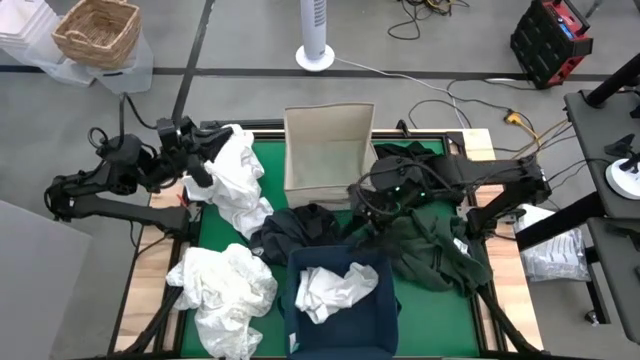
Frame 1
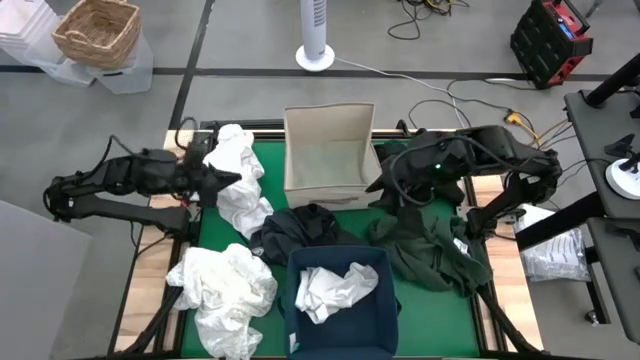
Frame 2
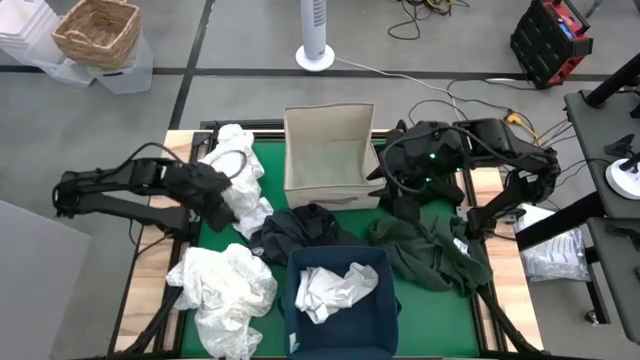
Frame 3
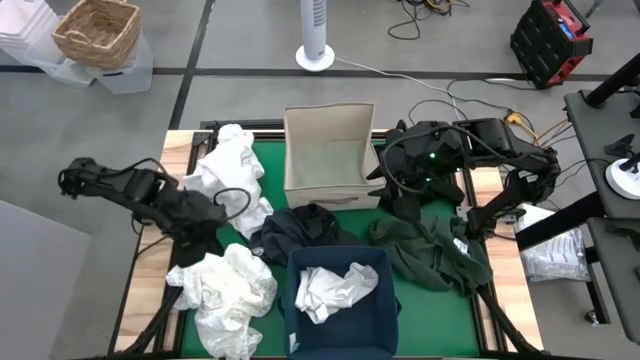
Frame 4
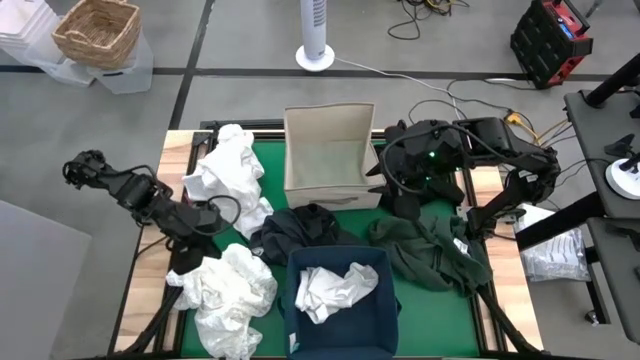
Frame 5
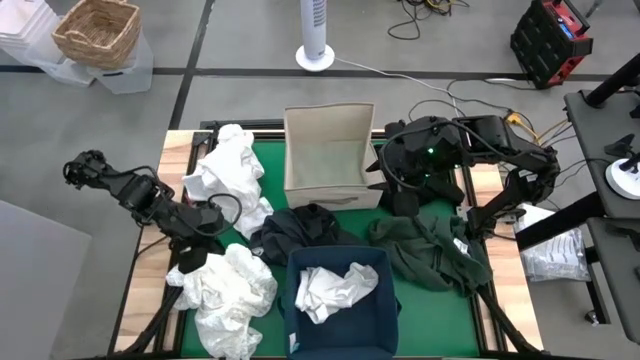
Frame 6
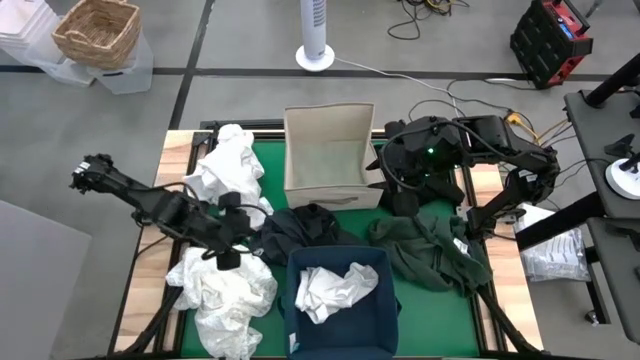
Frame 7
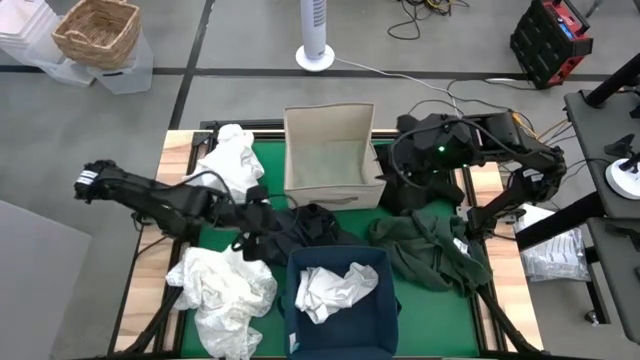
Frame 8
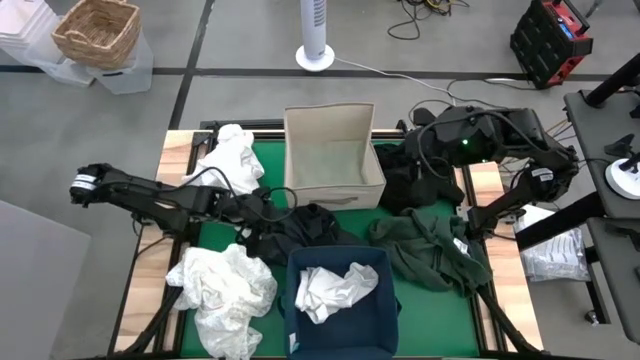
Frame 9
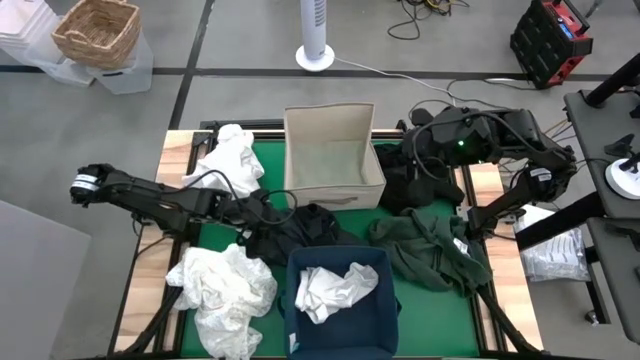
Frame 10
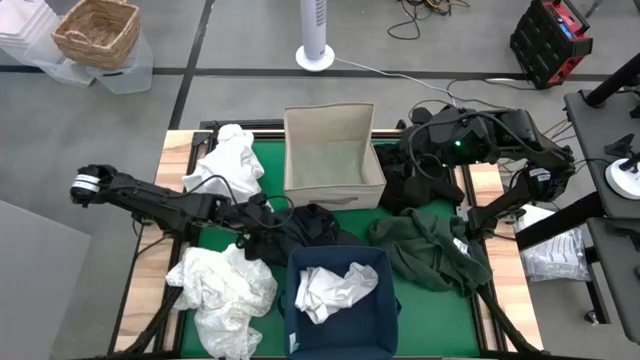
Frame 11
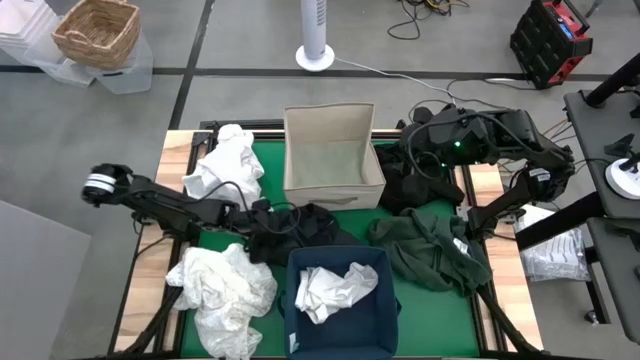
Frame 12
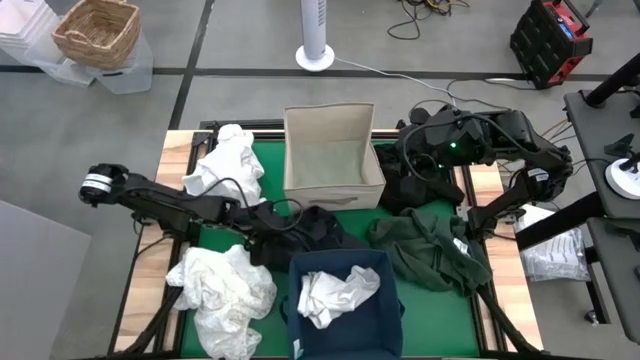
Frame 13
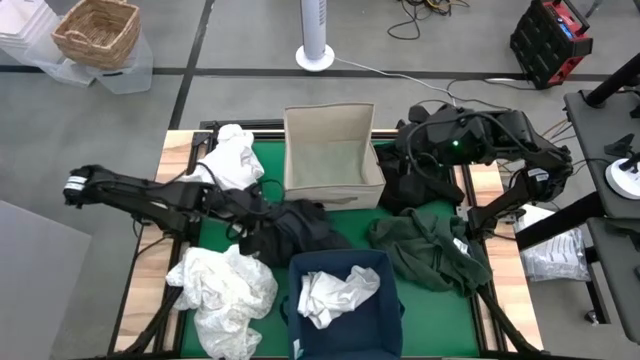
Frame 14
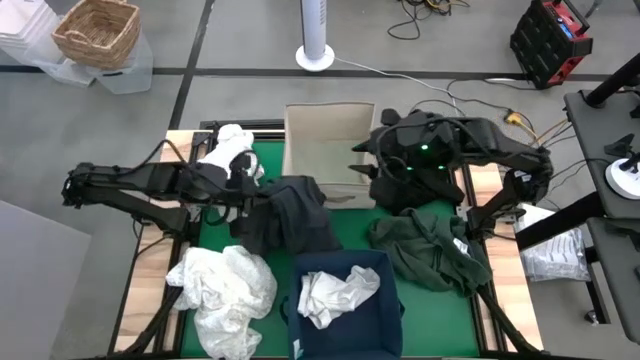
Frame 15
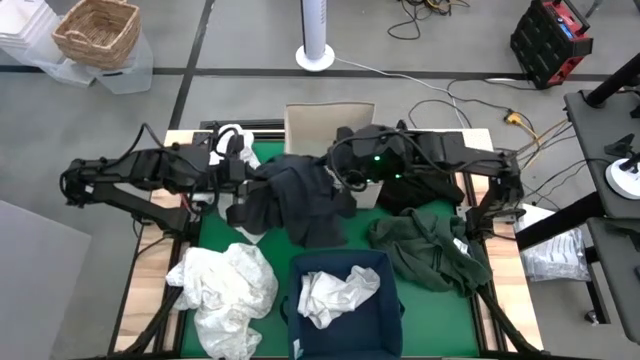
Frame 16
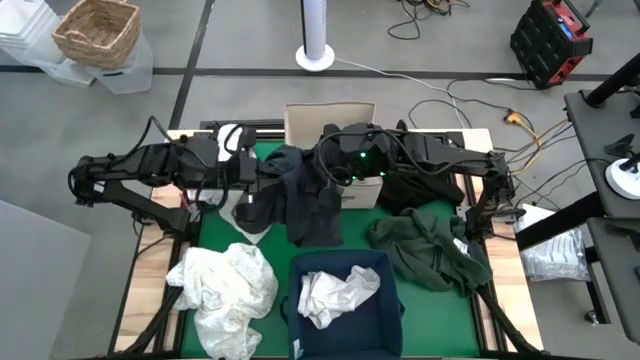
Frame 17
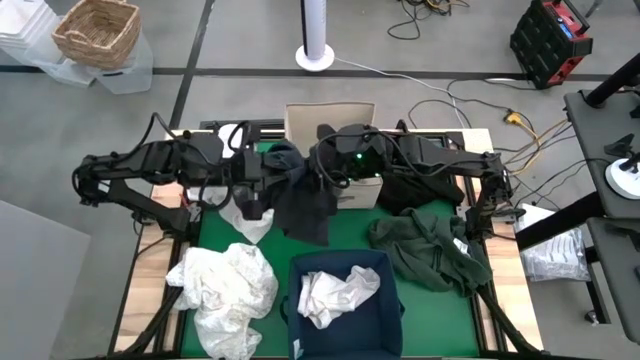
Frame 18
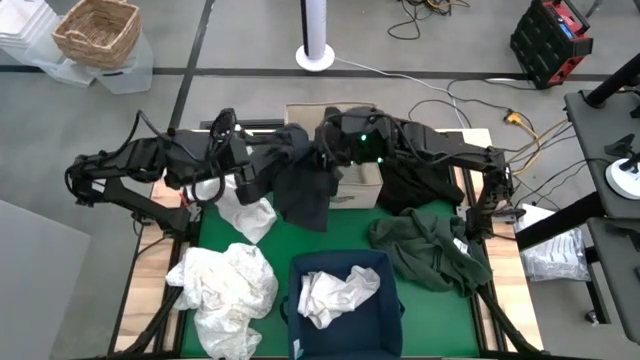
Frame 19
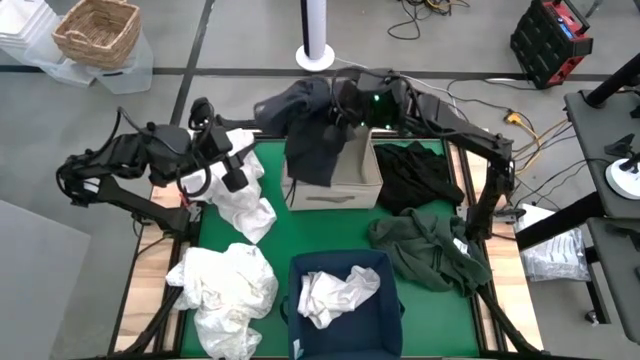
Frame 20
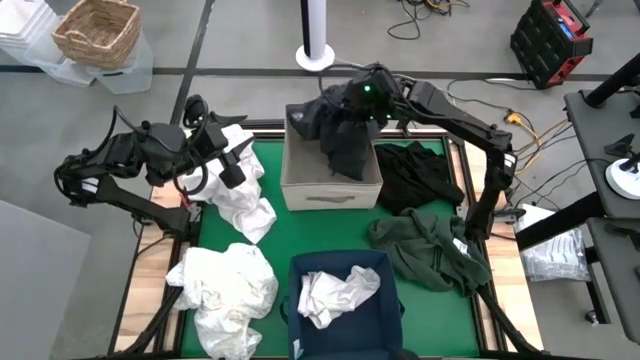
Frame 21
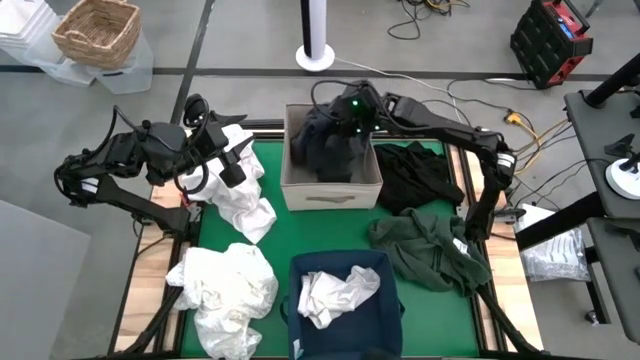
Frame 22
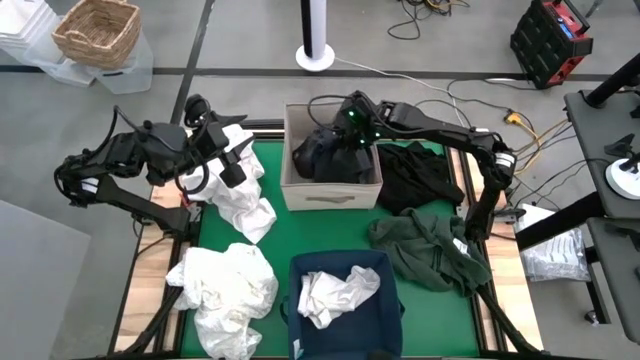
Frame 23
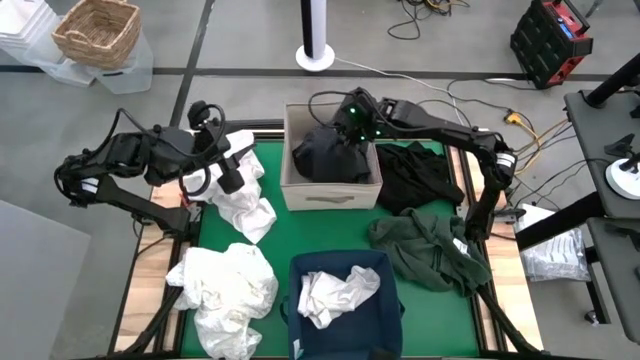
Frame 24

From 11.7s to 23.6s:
Put the left black shirt into the white laundry bin
